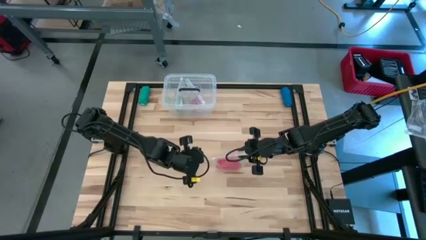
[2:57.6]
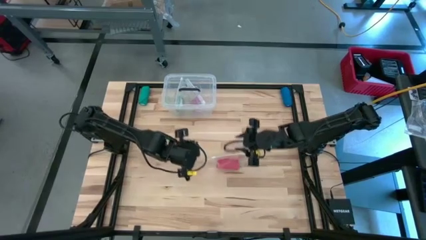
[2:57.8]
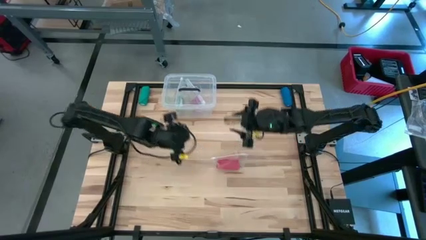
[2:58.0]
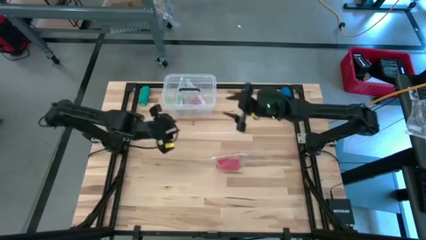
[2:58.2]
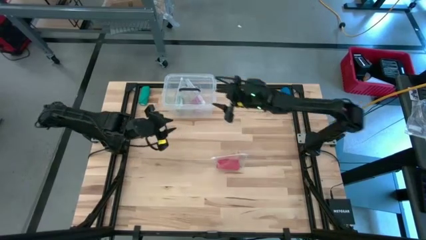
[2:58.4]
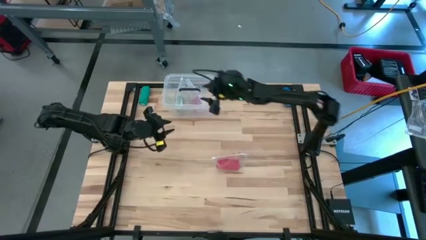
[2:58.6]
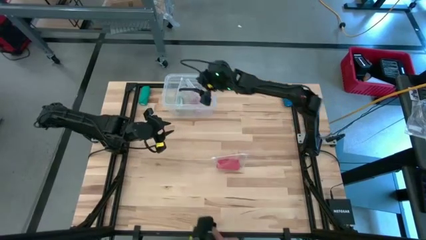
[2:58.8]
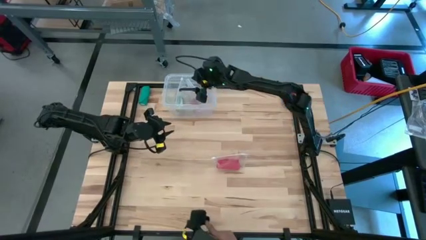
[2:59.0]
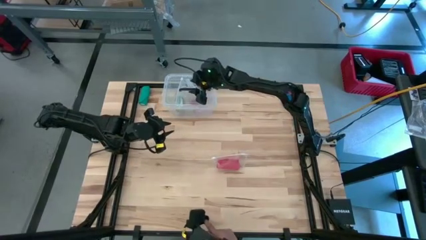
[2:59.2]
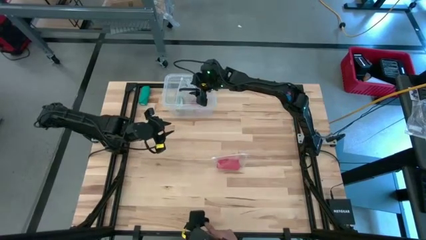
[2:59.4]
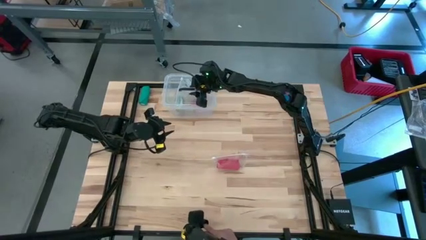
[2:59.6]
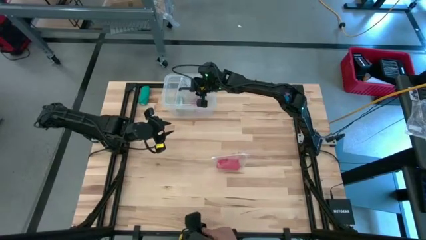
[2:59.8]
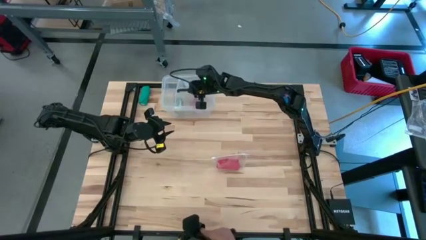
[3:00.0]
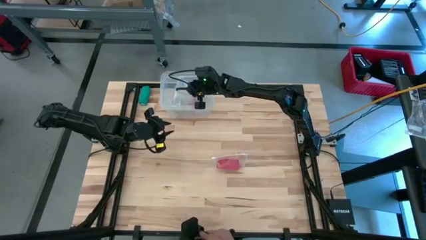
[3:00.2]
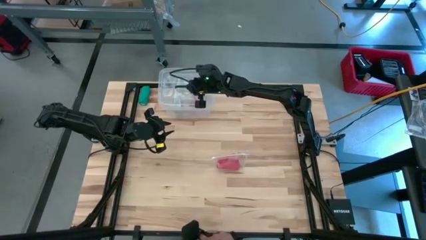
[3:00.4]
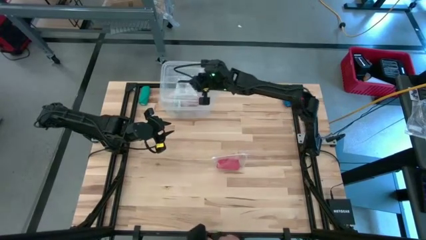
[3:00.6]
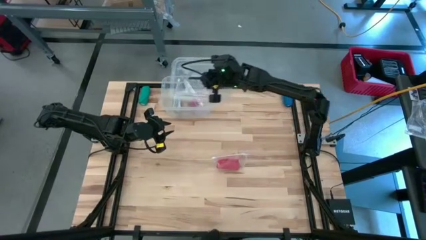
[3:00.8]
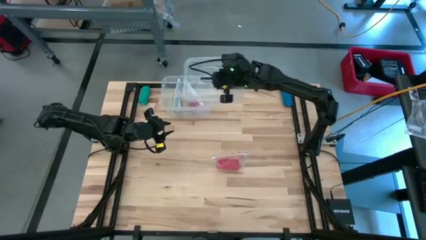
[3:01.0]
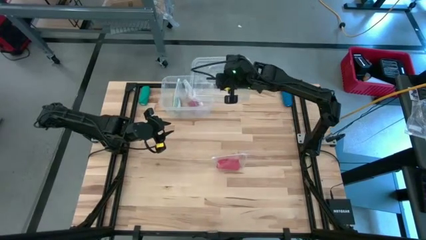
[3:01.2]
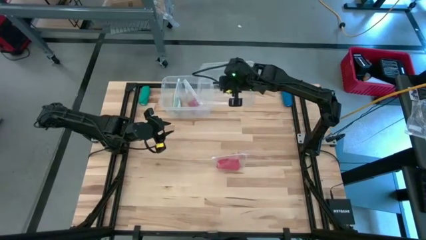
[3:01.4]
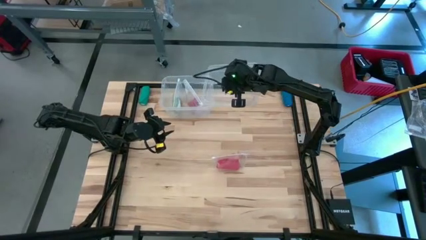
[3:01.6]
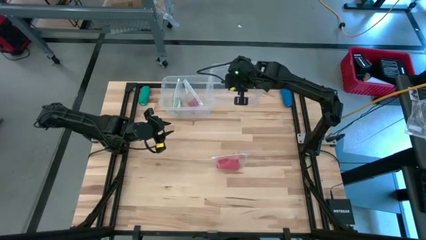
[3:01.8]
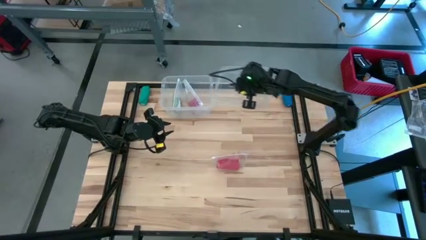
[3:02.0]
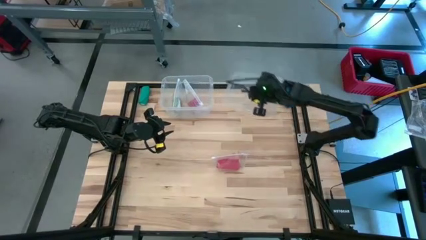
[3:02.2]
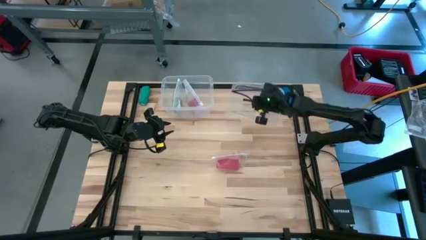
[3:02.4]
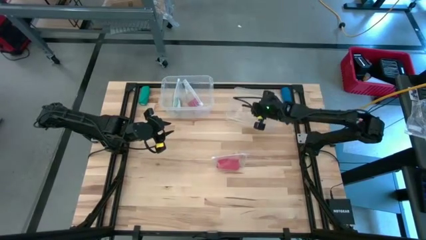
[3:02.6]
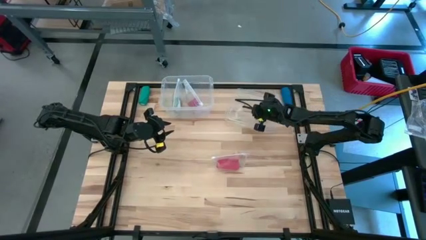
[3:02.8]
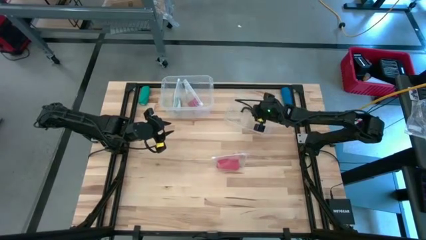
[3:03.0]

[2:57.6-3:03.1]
Task: Roll bandage
Open the transparent container

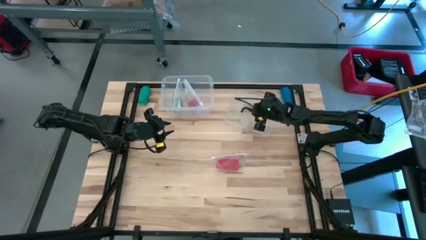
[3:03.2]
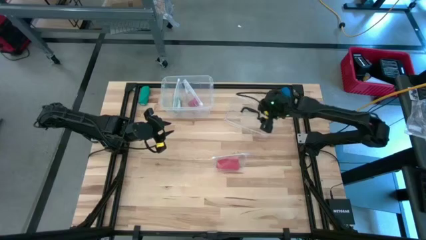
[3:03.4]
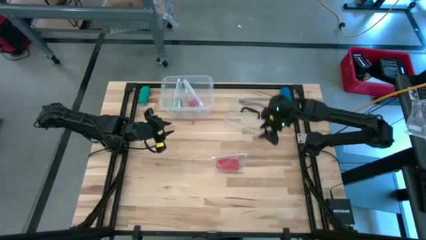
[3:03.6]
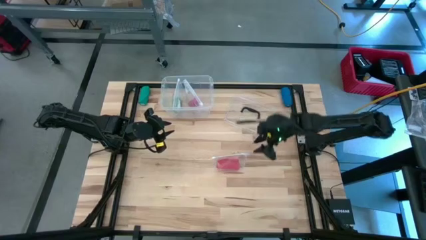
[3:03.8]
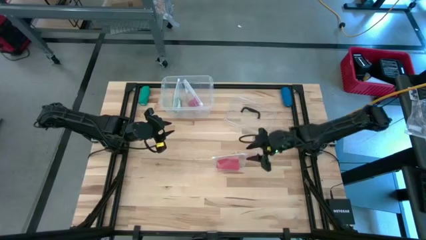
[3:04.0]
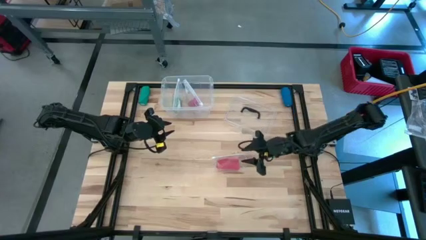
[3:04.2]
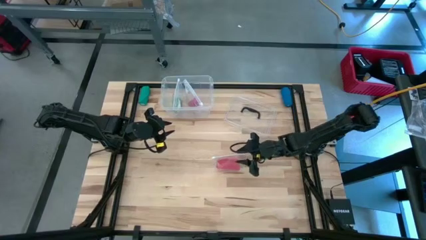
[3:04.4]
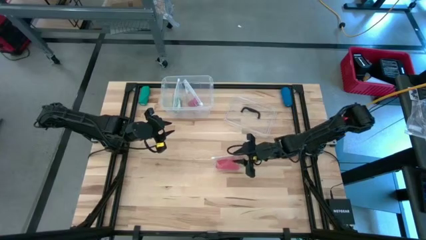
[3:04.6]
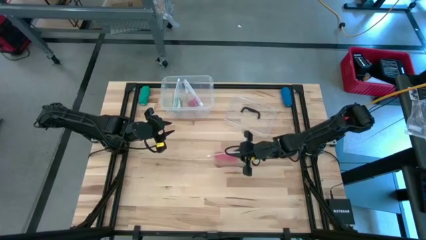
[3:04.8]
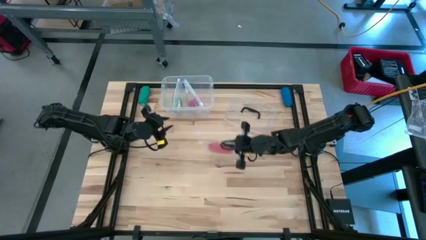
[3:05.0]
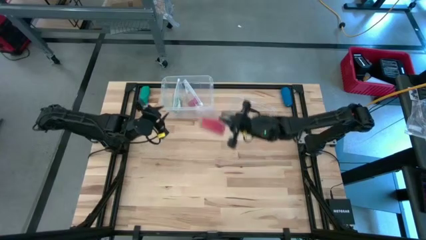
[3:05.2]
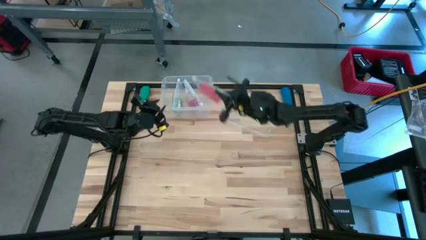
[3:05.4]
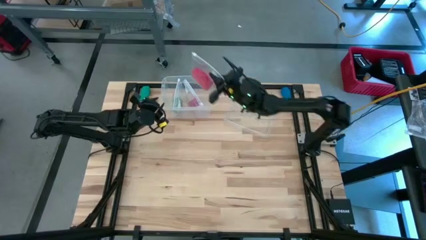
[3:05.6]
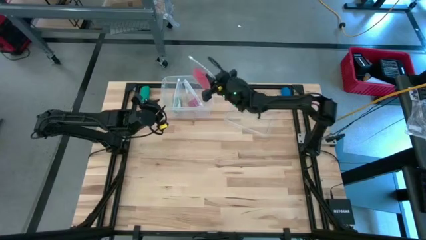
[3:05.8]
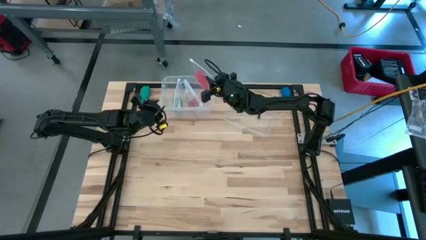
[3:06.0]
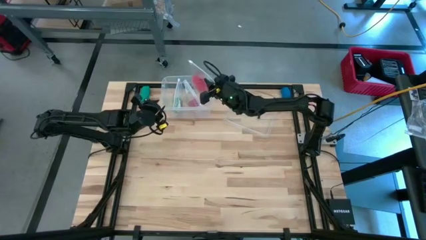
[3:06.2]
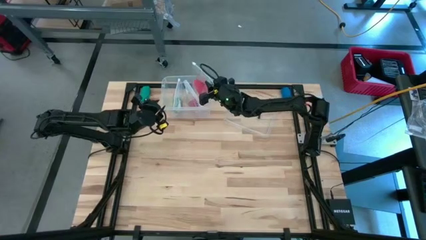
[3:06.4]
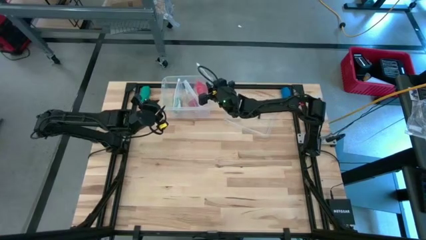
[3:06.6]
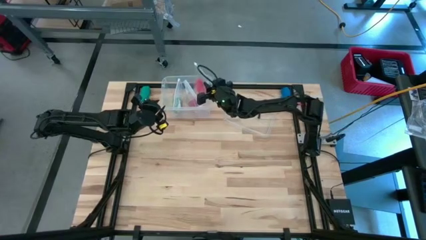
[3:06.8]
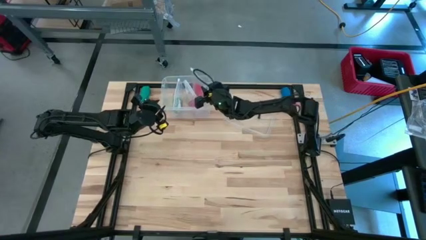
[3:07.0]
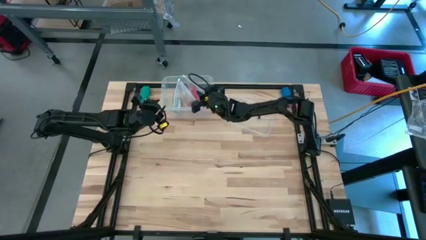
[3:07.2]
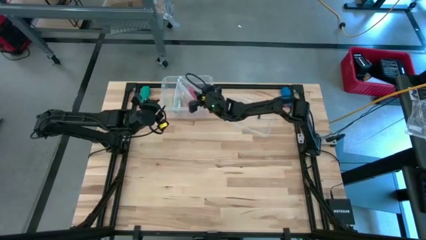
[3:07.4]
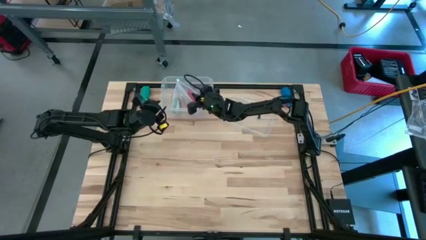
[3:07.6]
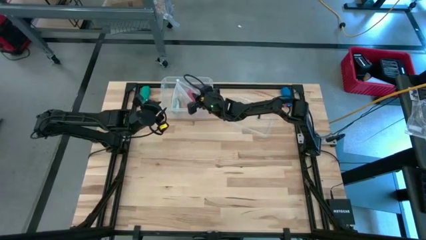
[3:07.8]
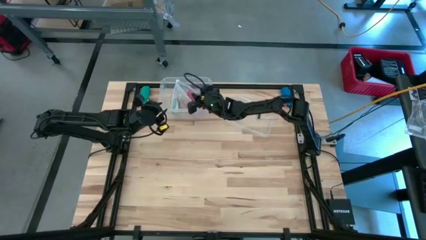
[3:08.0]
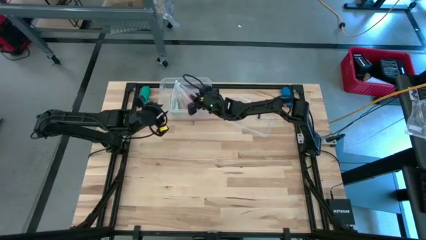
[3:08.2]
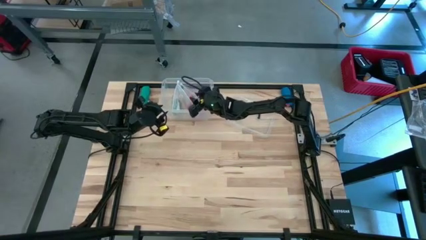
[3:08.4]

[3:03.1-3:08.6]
Put the zip bag into the transparent container
